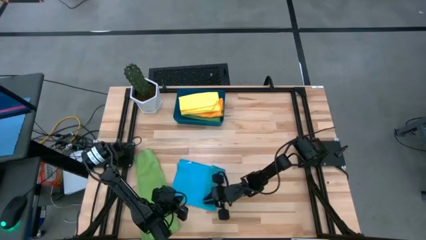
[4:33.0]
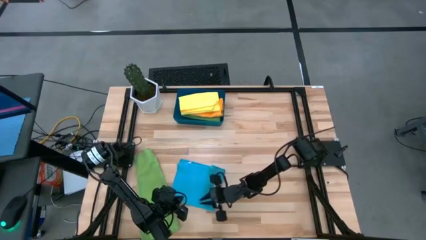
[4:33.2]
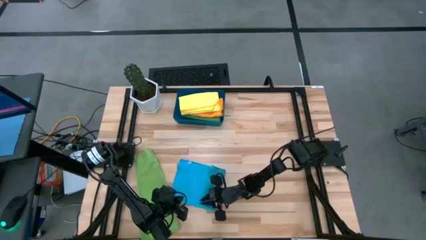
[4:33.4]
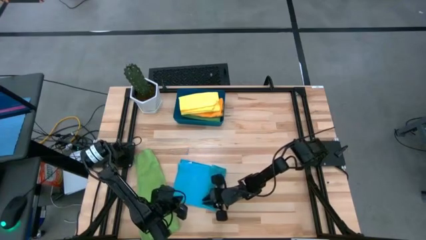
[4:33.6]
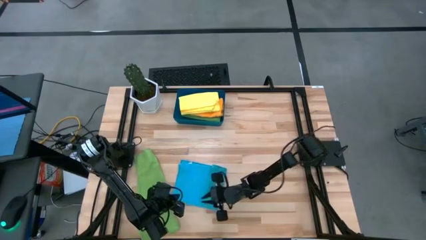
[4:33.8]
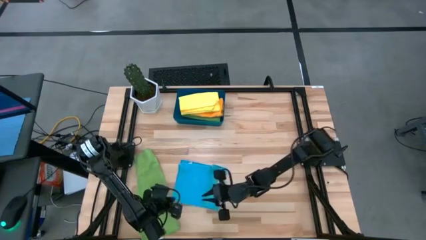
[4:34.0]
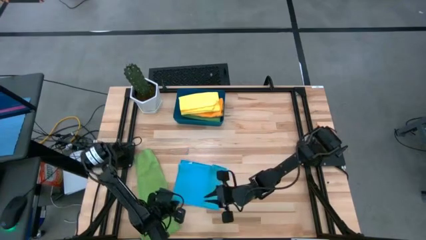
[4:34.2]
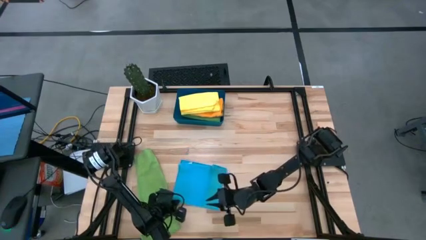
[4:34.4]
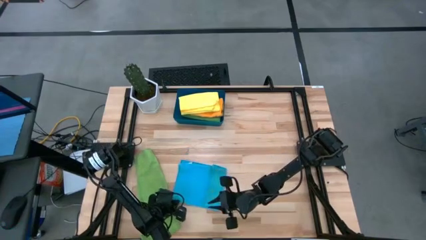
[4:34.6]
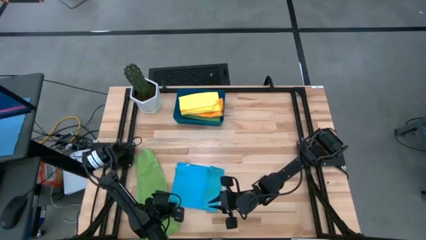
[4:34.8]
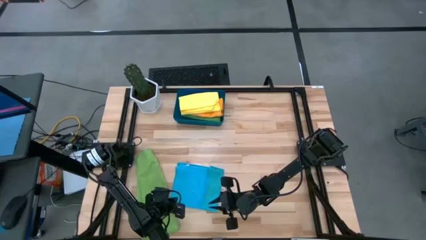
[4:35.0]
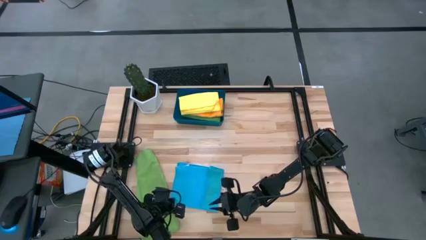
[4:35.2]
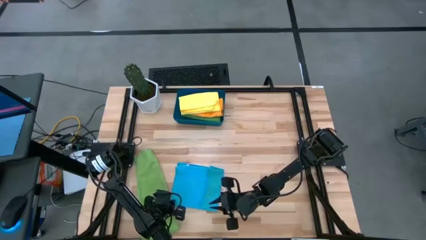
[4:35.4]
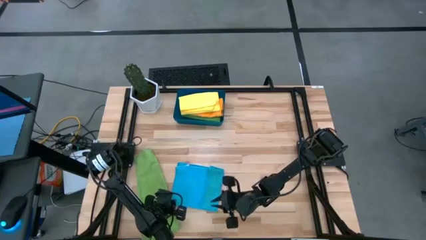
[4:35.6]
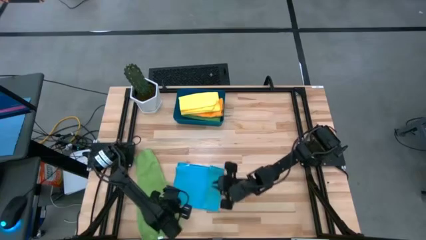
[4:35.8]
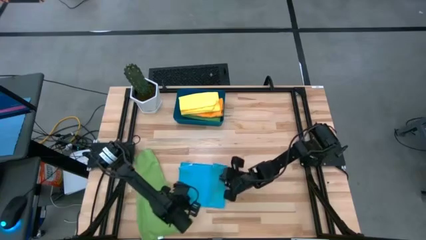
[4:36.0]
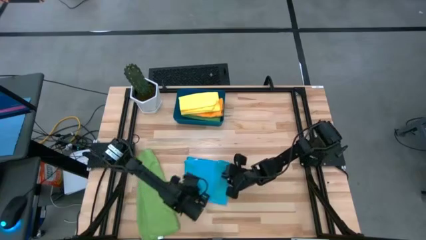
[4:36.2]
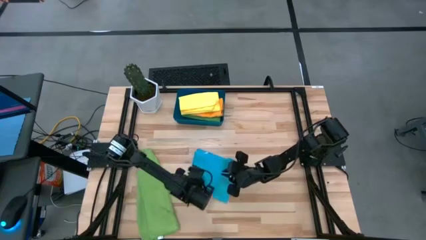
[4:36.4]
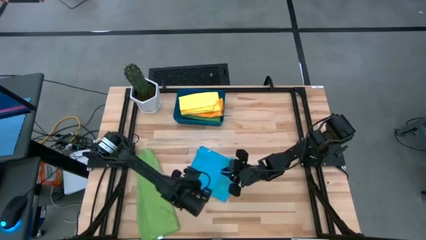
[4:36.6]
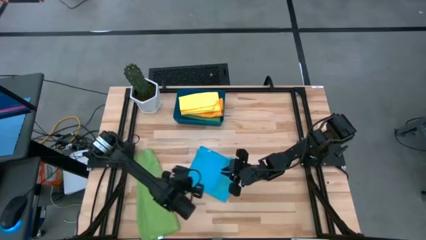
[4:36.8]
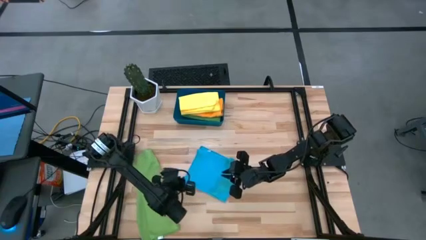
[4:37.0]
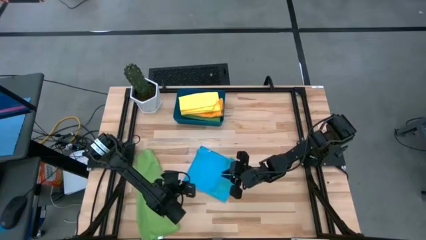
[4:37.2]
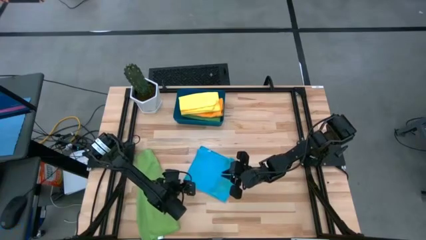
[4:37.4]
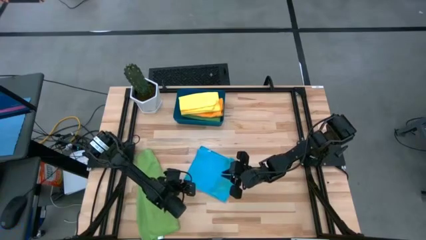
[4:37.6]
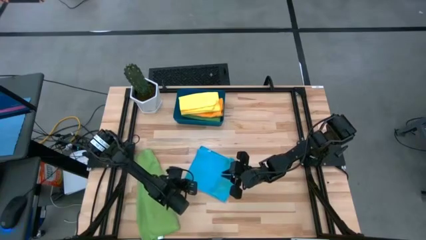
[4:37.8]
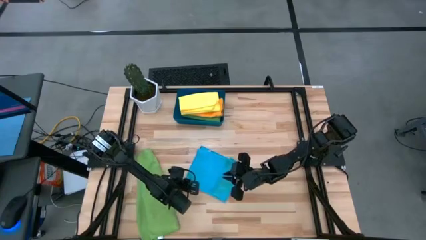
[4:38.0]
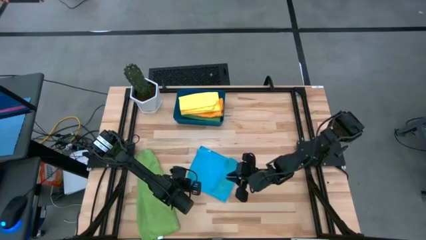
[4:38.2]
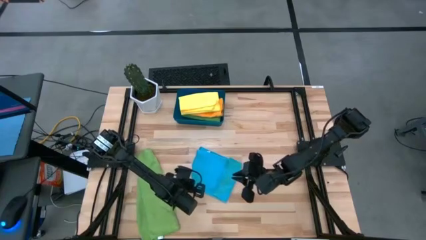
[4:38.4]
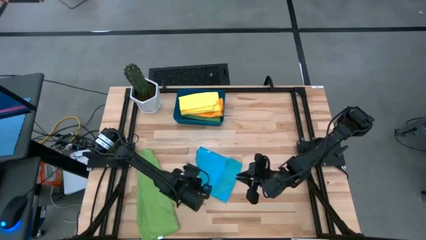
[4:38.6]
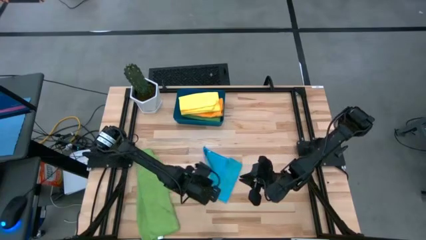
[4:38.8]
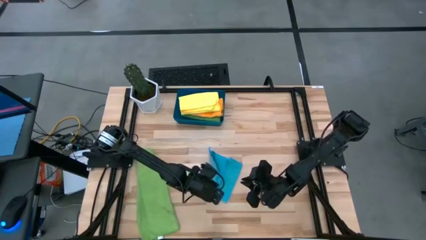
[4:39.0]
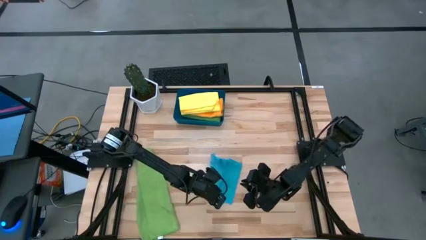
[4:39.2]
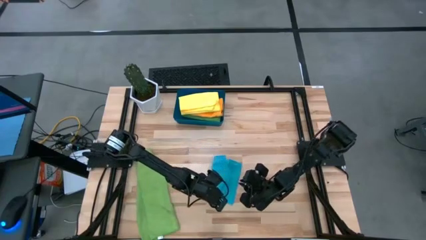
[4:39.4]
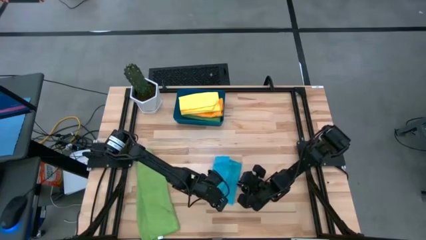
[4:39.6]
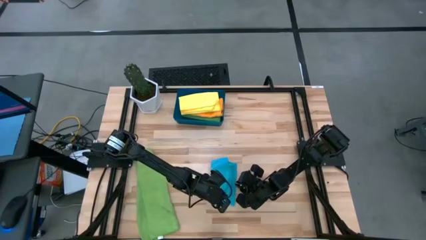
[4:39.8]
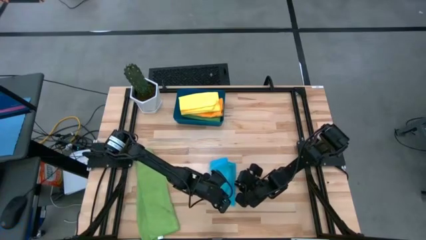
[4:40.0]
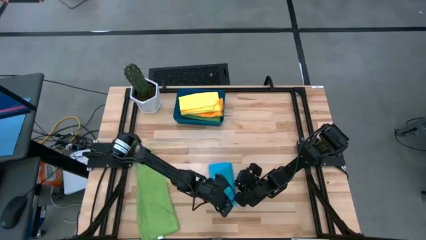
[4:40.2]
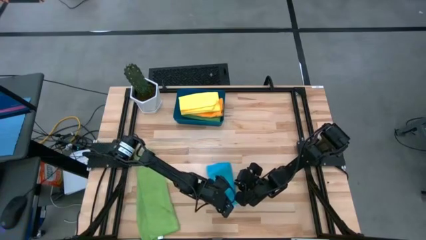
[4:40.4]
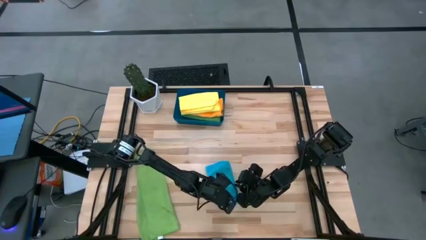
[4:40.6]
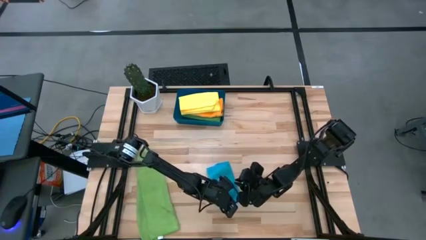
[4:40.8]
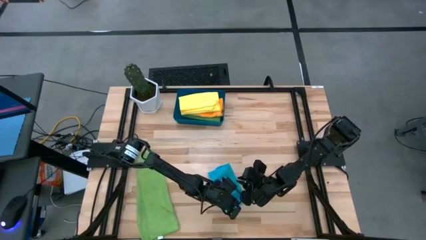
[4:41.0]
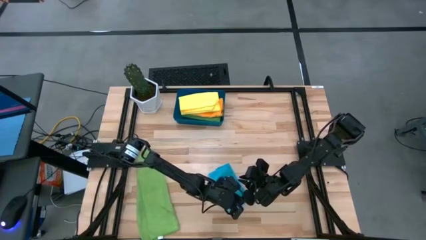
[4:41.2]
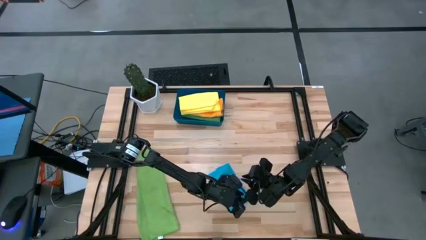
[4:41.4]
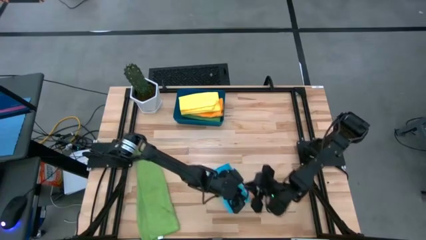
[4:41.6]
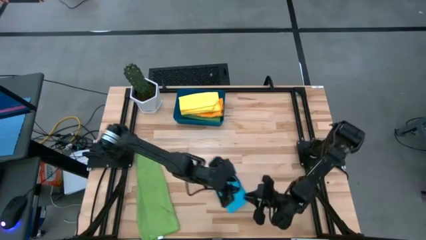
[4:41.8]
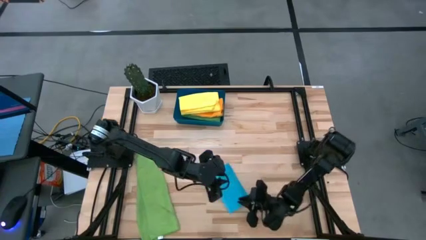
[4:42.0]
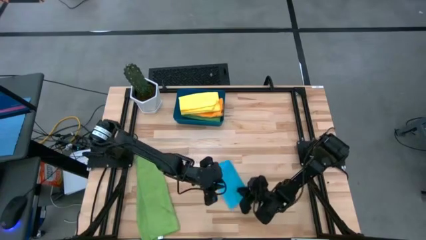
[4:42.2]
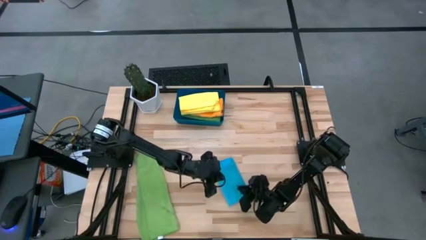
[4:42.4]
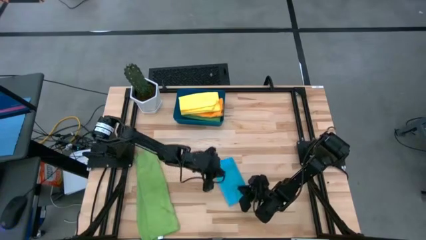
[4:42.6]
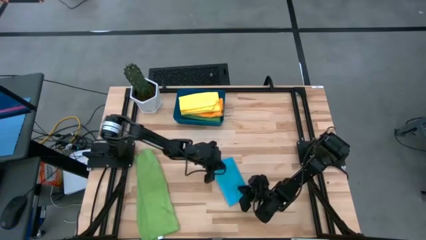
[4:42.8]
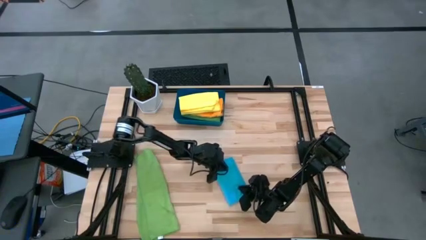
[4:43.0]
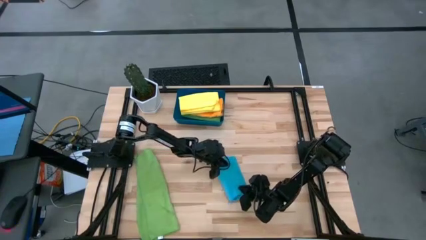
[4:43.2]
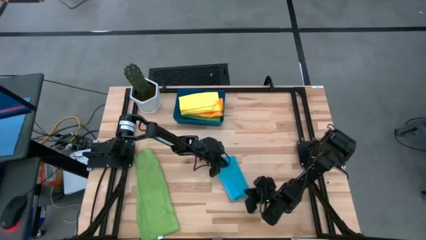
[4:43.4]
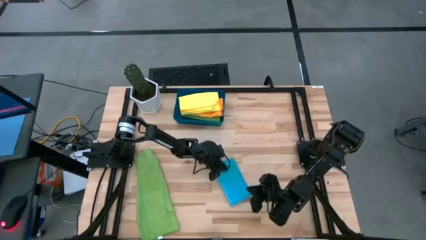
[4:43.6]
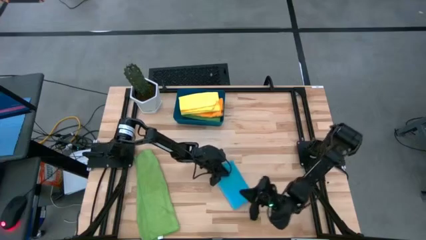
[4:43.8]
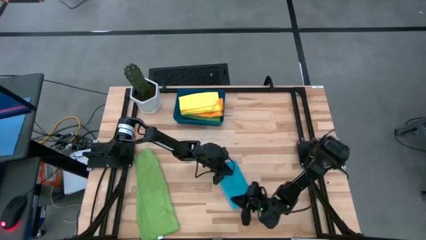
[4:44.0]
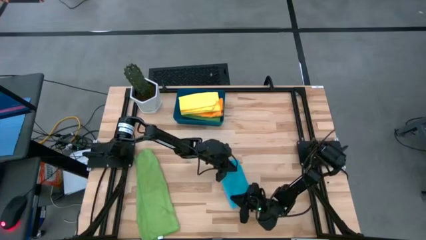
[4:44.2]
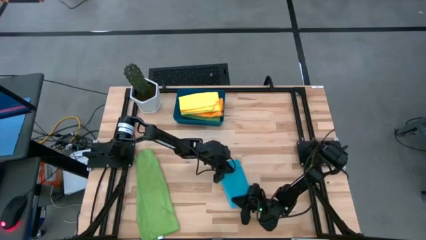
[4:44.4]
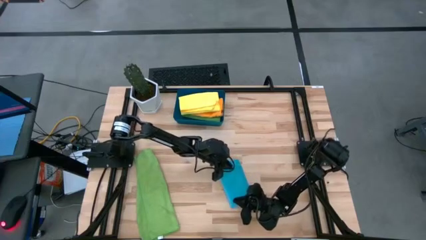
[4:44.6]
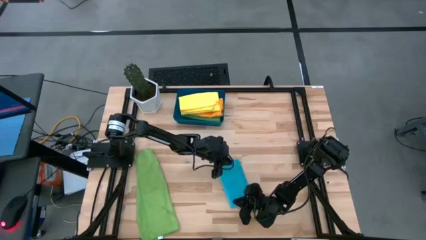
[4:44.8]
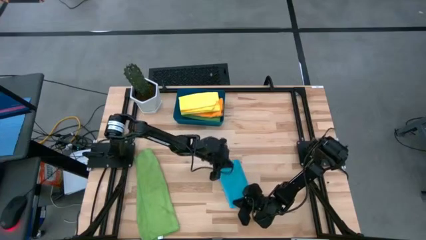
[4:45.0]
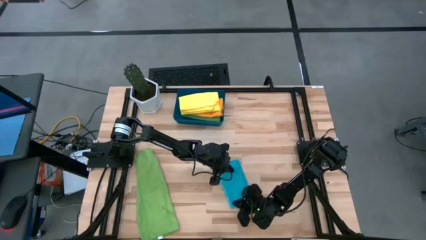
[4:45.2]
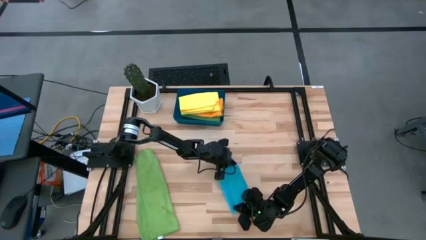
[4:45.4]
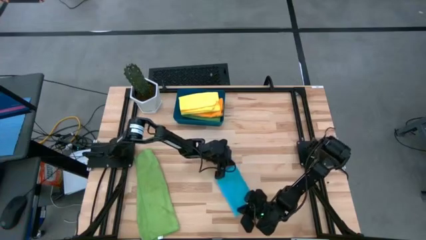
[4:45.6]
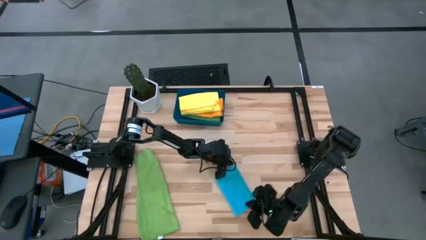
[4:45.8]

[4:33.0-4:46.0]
Task: Fold microfiber towels
Fold the blue towel

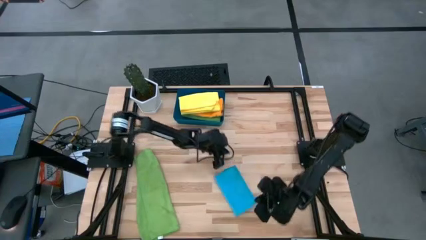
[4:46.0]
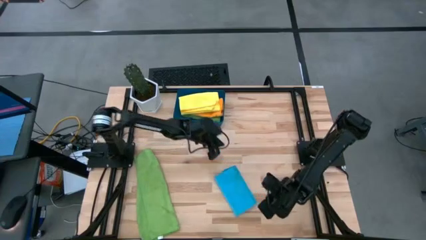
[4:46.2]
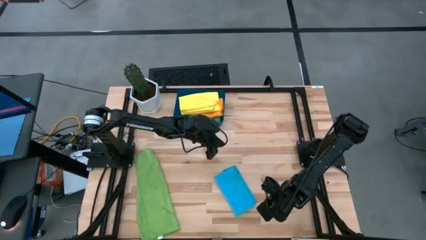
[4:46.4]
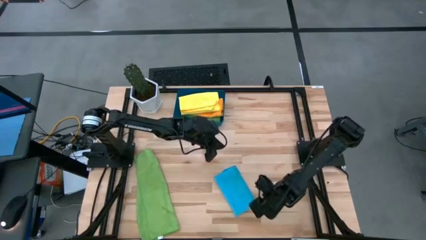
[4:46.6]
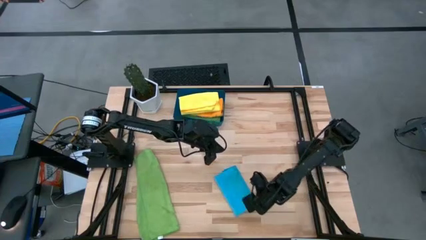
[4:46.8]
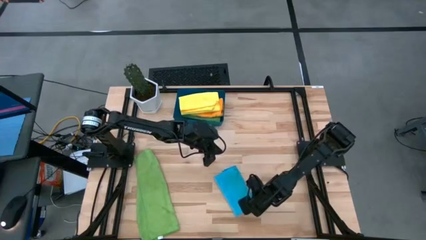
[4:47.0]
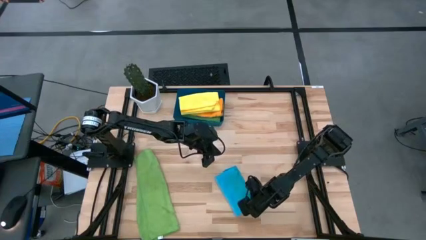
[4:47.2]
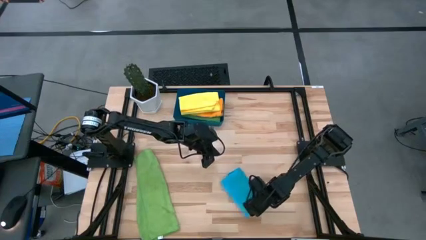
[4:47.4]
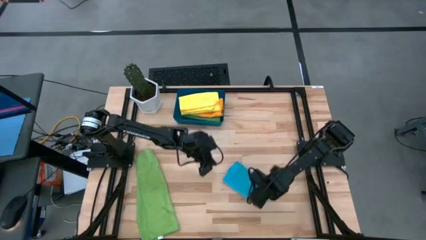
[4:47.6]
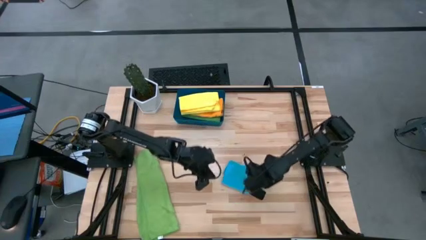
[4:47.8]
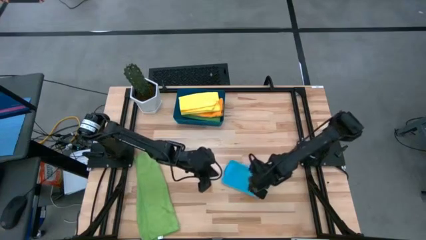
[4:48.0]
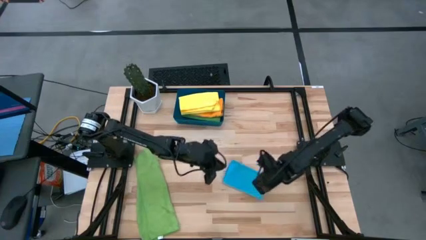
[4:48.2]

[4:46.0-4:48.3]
Put the blue towel into the blue bin
